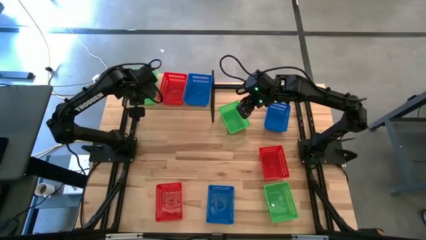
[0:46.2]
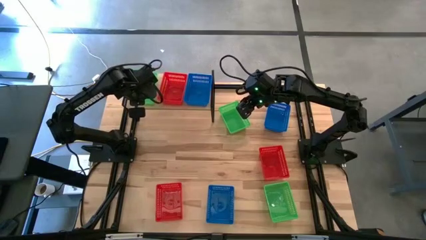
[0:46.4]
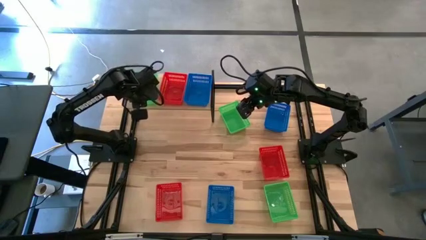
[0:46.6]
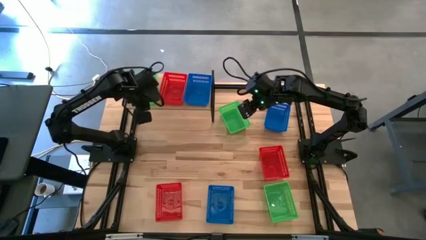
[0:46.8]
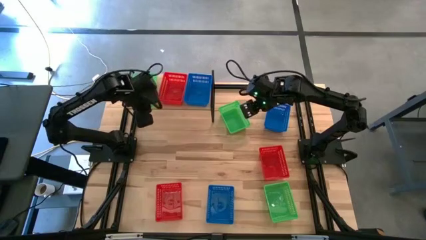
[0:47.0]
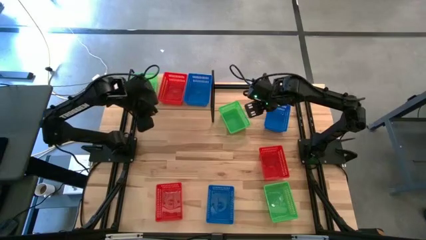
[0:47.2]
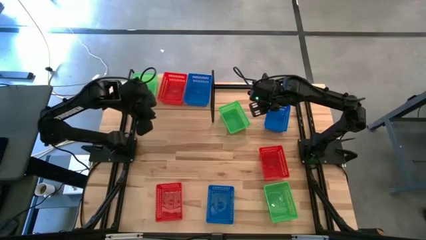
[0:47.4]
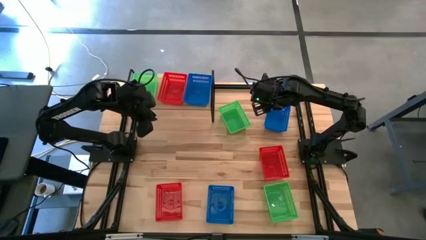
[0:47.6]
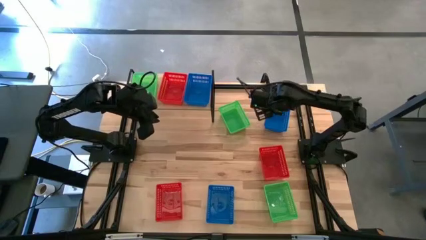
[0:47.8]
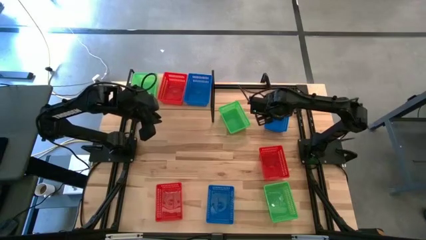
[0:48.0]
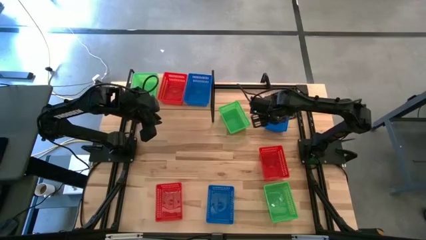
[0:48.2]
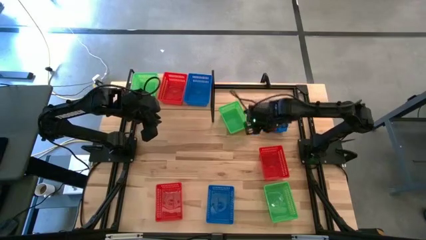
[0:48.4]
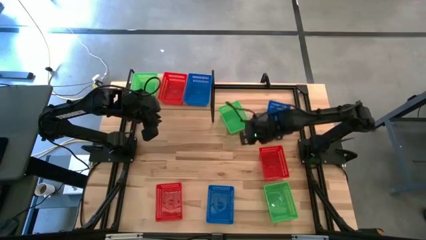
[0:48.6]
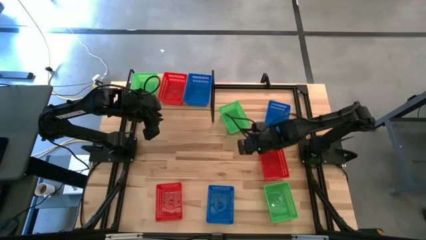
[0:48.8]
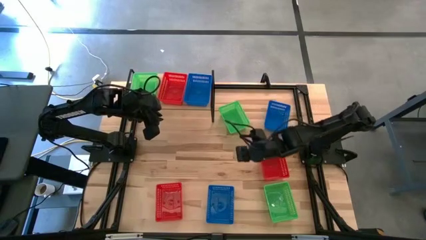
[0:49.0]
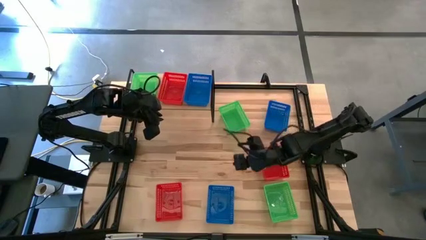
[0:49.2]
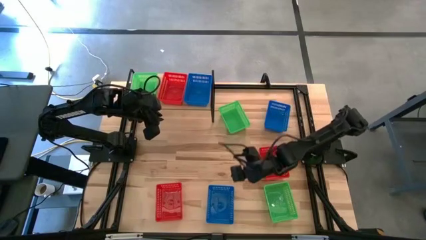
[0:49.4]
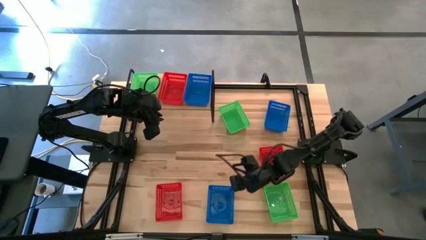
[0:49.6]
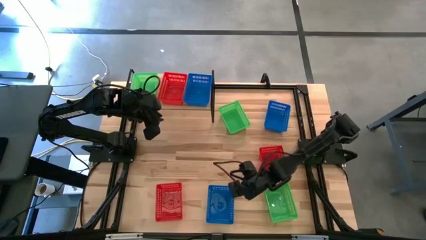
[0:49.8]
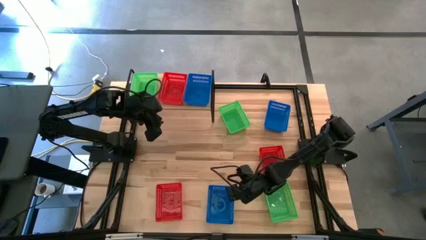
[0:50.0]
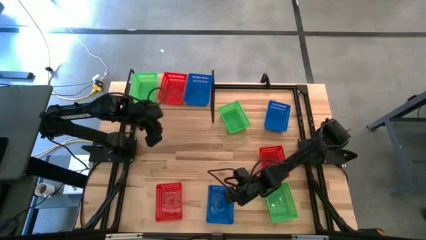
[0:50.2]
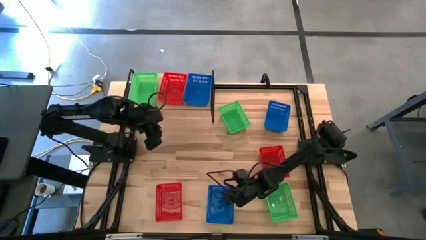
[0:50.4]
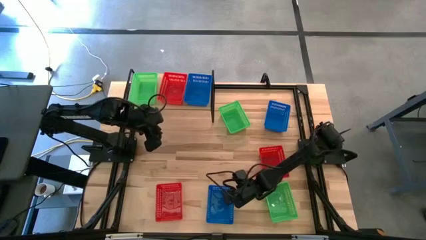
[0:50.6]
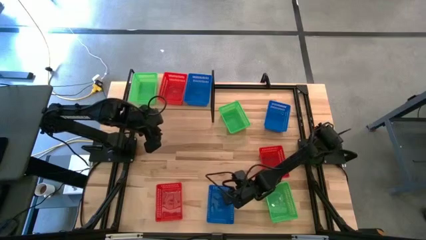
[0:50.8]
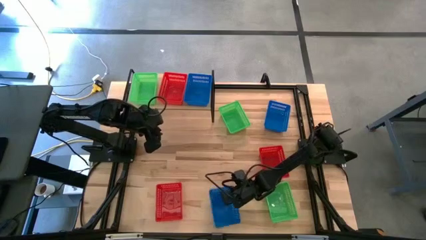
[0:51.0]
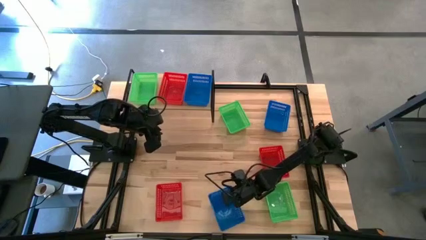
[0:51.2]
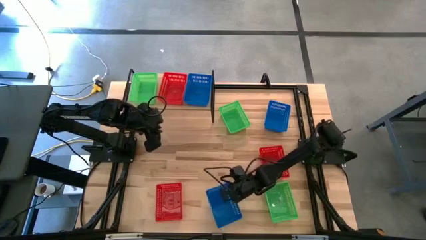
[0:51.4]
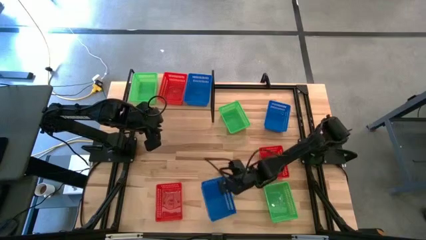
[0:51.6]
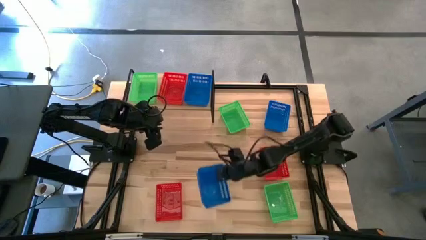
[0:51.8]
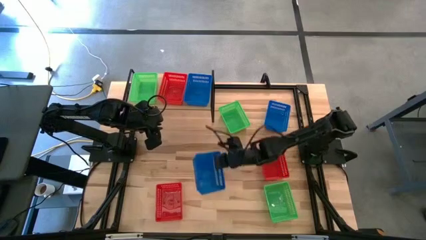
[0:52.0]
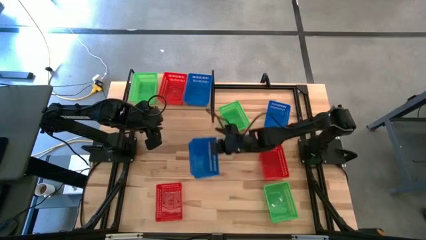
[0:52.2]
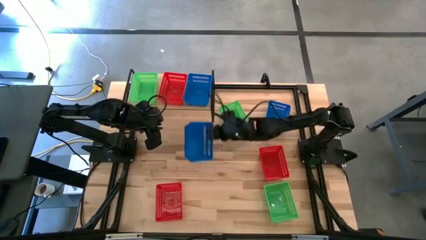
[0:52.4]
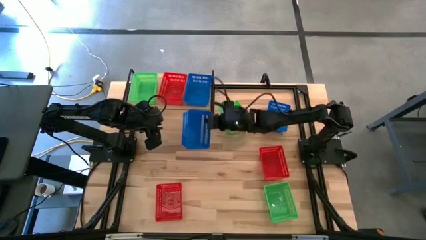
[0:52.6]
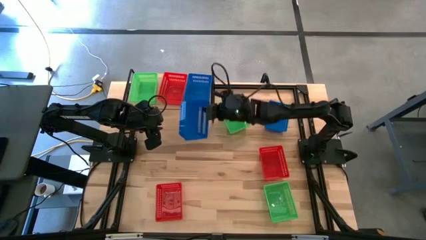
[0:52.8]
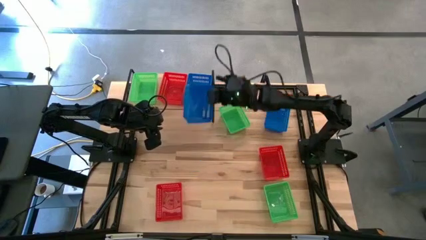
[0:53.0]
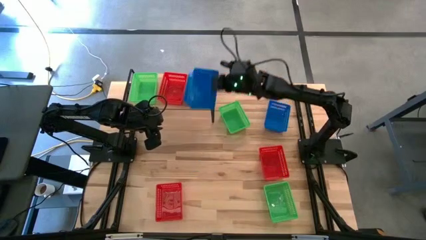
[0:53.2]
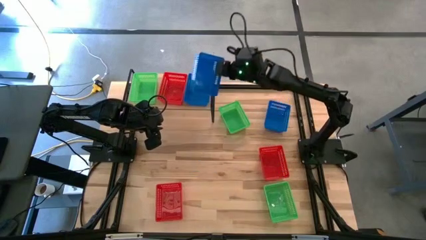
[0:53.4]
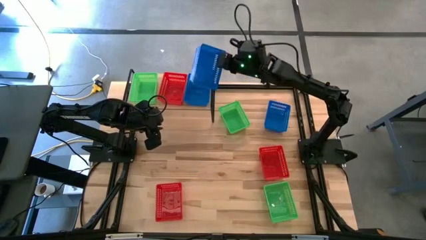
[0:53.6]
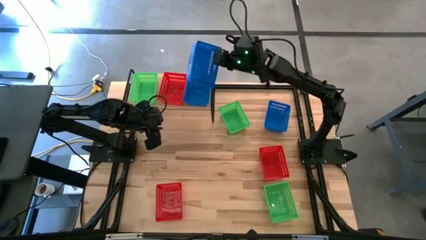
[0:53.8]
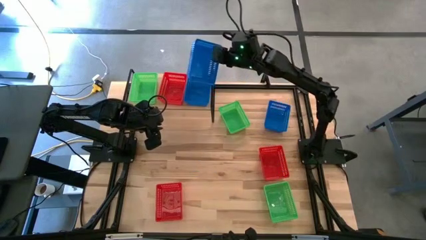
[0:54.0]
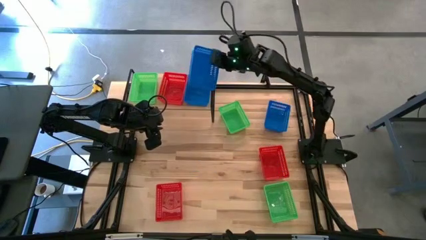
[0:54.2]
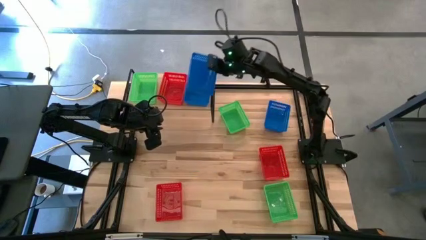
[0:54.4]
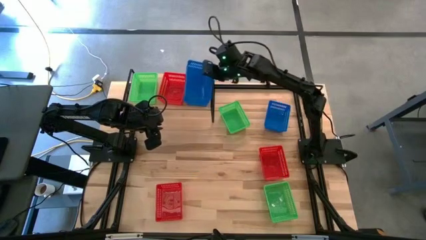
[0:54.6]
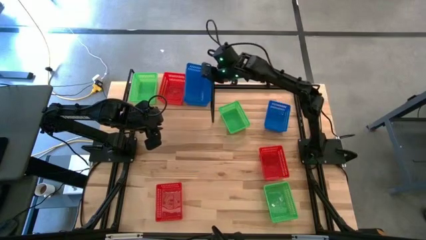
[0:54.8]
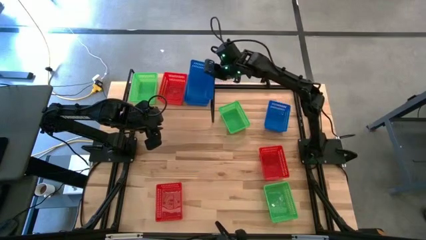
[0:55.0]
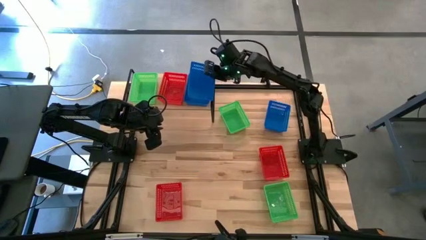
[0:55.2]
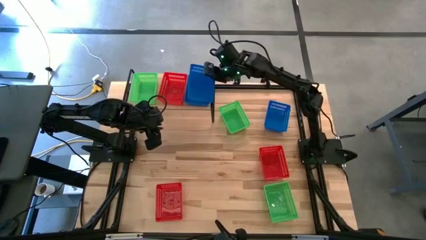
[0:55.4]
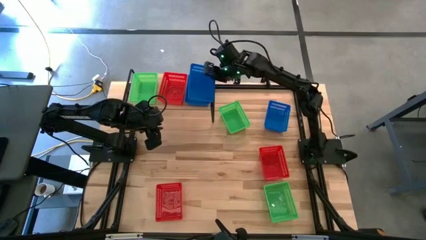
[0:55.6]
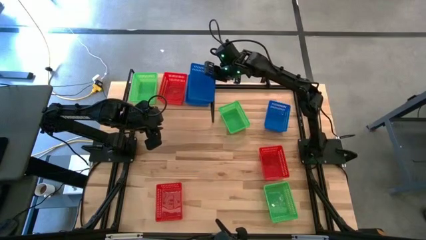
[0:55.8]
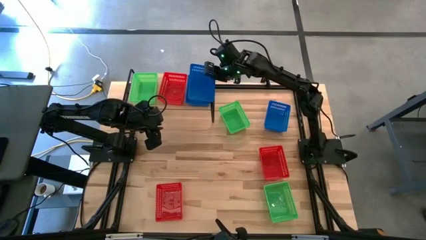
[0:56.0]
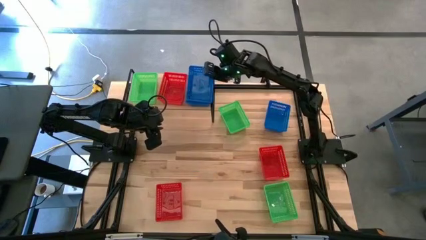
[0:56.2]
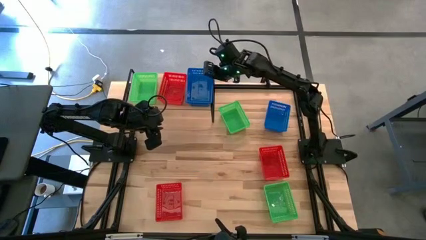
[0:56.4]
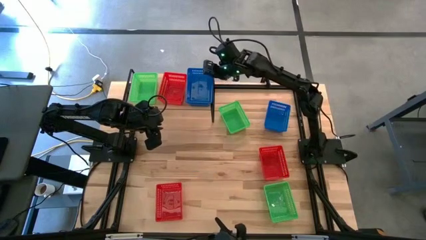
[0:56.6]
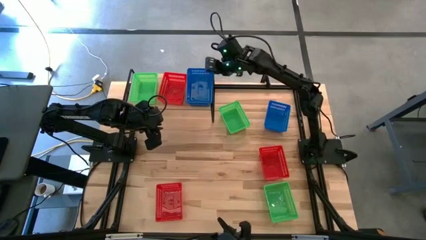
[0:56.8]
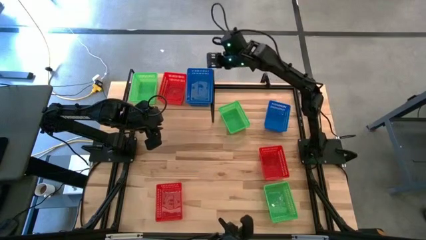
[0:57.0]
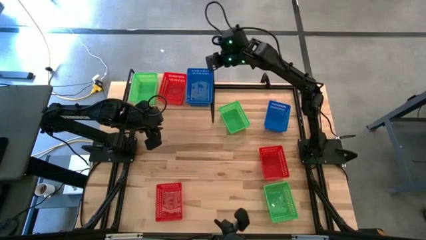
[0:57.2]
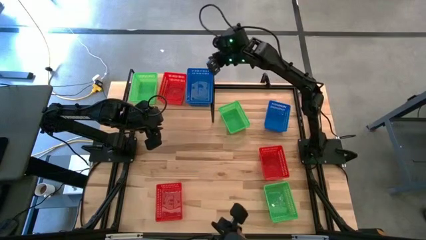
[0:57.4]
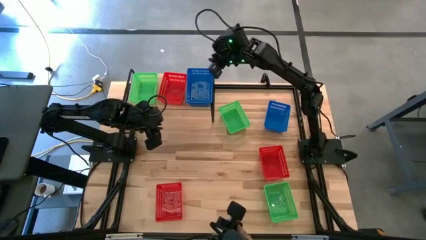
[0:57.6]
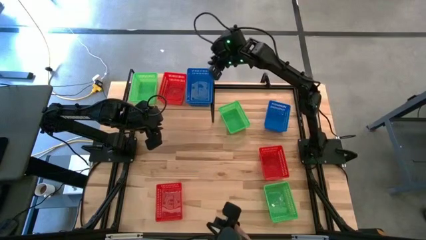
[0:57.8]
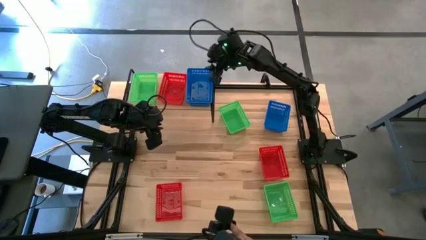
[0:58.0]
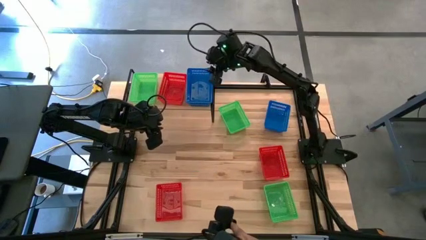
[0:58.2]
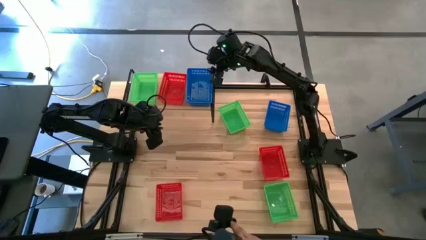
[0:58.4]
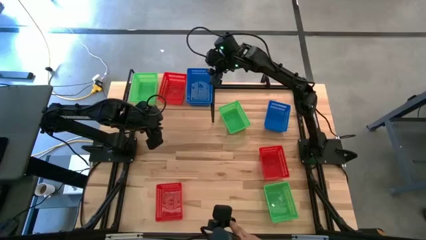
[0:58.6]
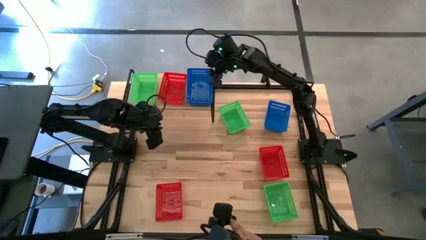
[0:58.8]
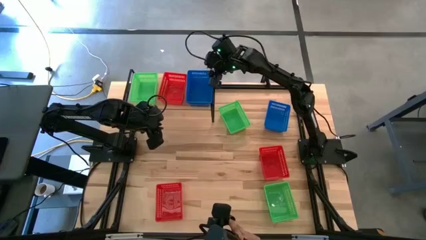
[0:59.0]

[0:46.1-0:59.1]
Task: Stack baskets on shelf by color
Stack the bottom blue basket on top of the blue basket on the shelf
